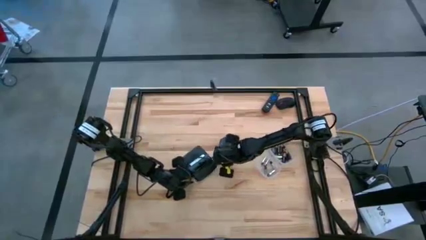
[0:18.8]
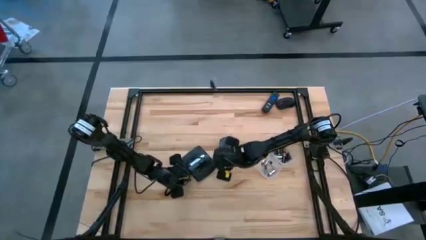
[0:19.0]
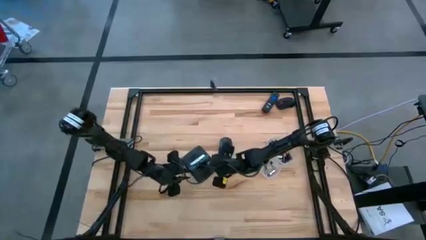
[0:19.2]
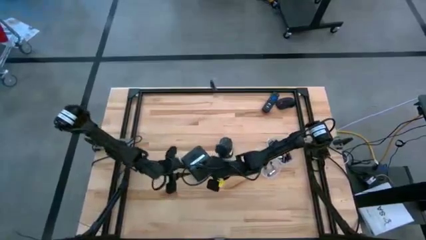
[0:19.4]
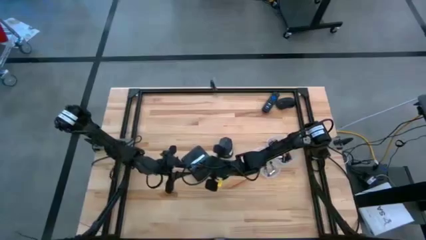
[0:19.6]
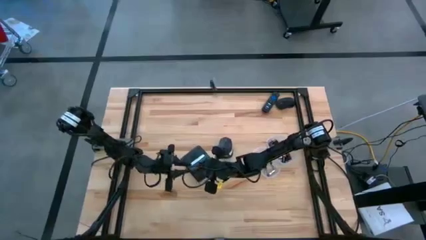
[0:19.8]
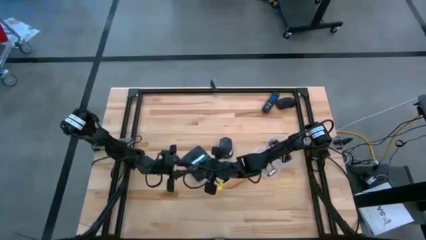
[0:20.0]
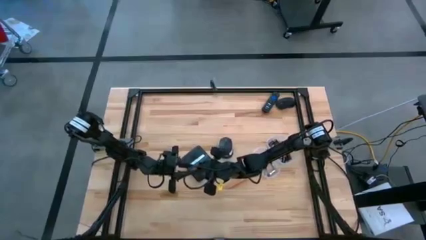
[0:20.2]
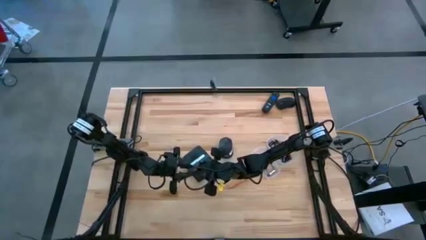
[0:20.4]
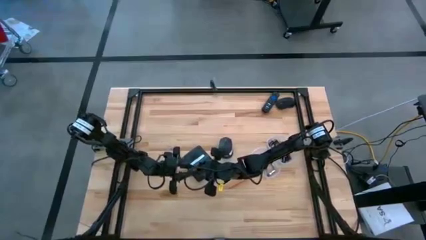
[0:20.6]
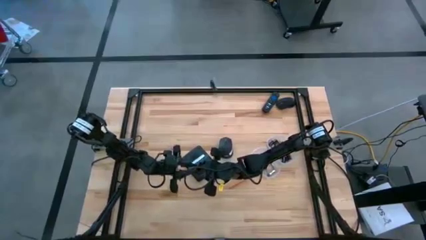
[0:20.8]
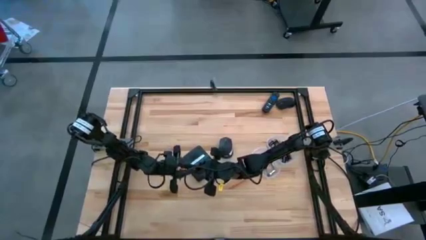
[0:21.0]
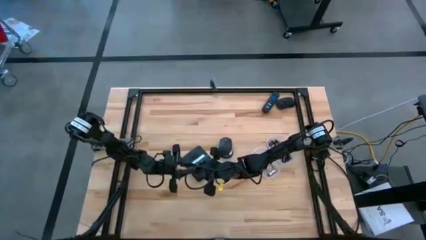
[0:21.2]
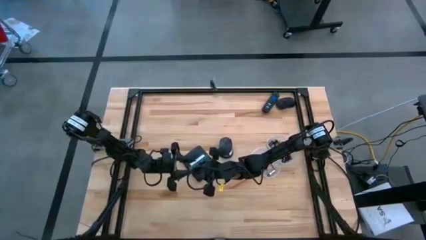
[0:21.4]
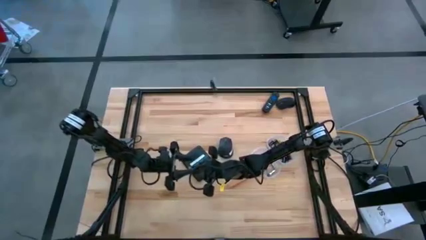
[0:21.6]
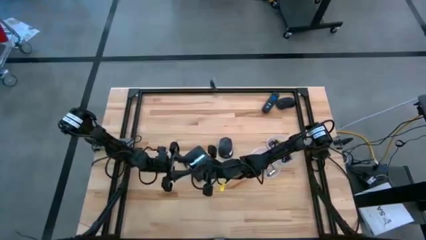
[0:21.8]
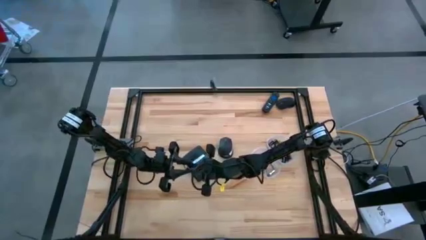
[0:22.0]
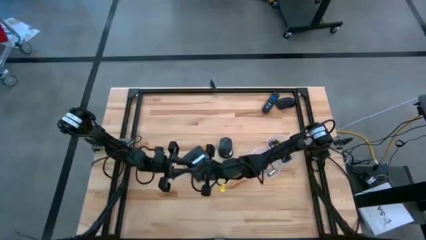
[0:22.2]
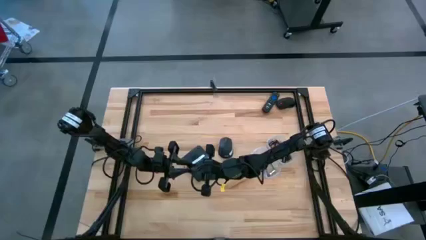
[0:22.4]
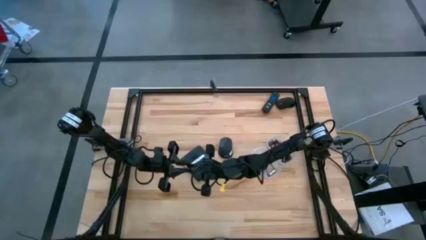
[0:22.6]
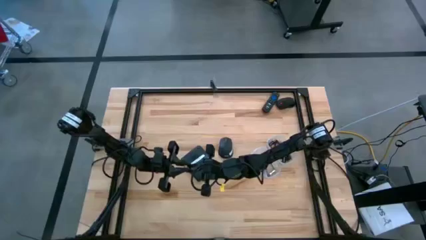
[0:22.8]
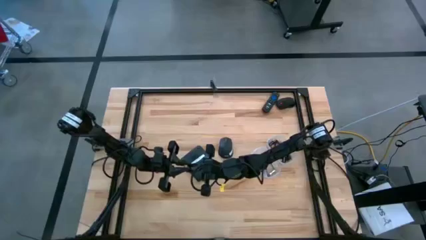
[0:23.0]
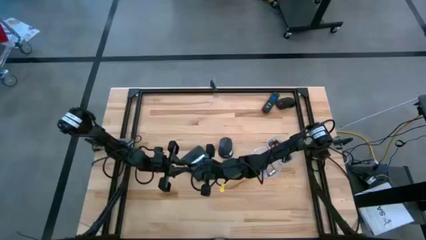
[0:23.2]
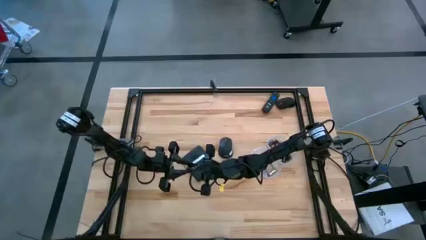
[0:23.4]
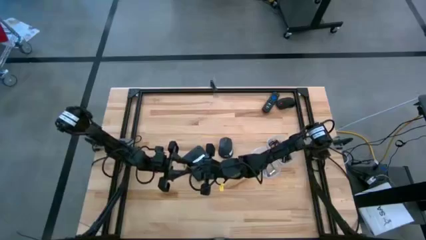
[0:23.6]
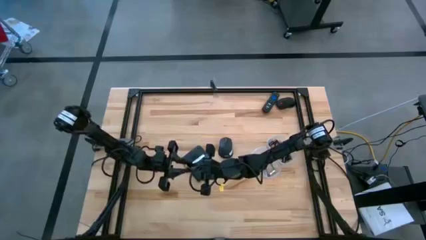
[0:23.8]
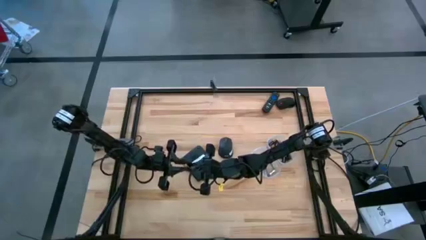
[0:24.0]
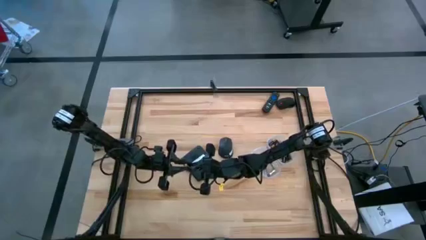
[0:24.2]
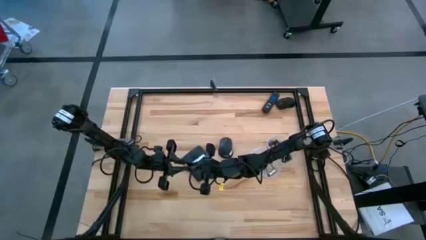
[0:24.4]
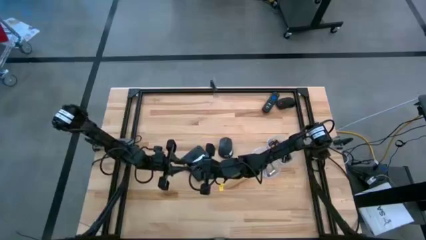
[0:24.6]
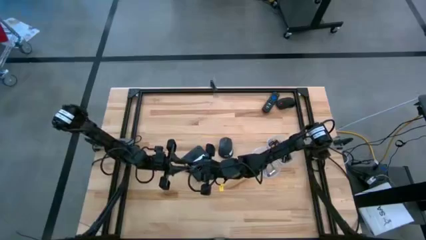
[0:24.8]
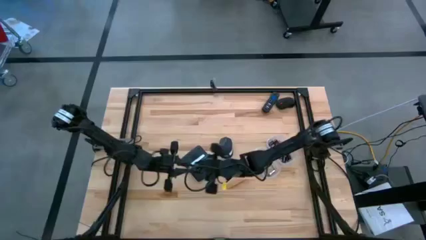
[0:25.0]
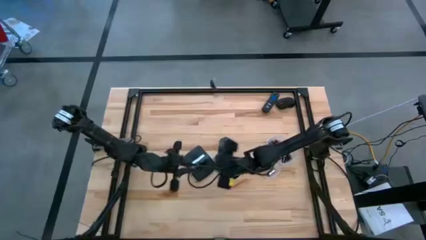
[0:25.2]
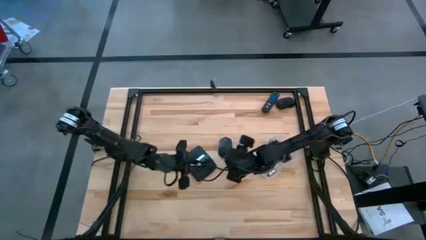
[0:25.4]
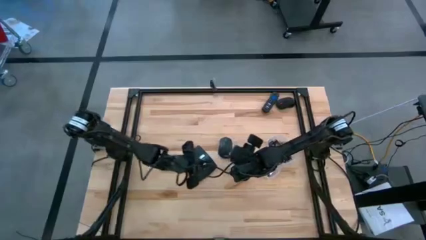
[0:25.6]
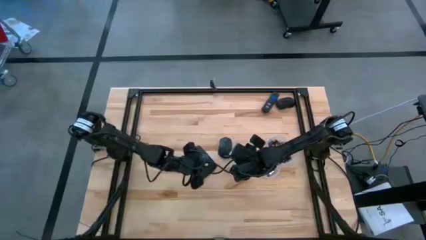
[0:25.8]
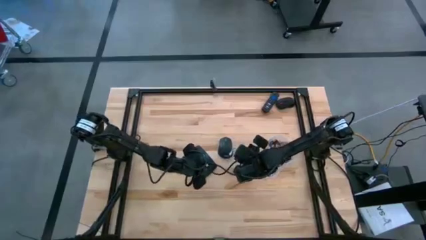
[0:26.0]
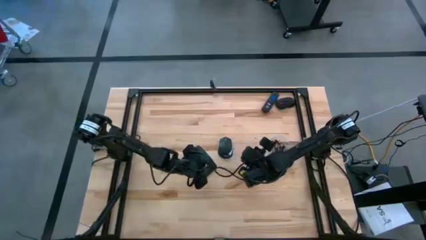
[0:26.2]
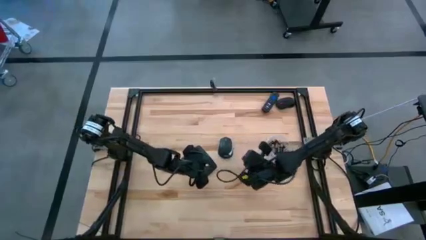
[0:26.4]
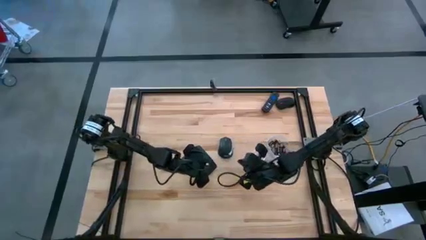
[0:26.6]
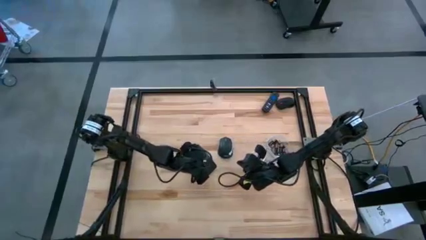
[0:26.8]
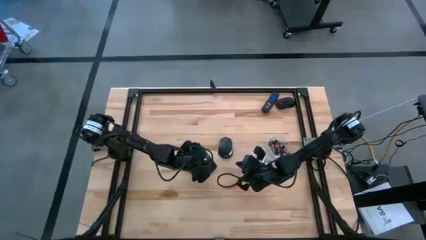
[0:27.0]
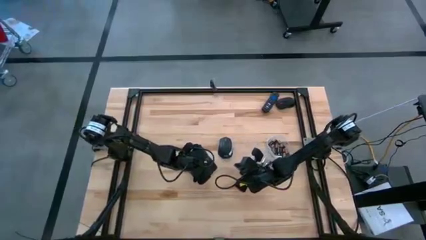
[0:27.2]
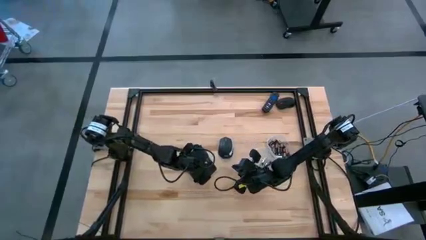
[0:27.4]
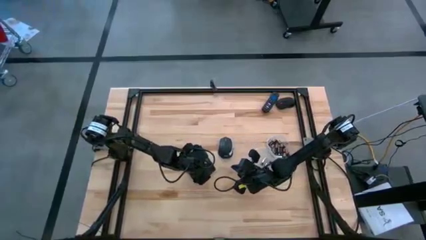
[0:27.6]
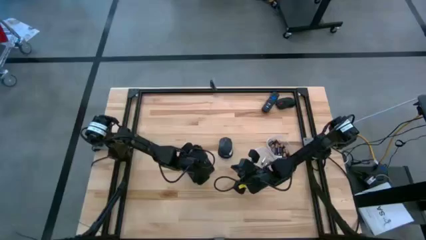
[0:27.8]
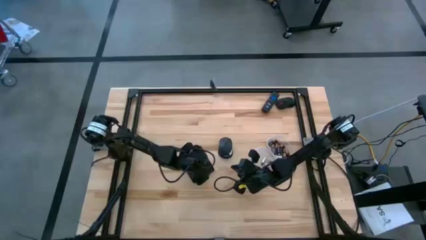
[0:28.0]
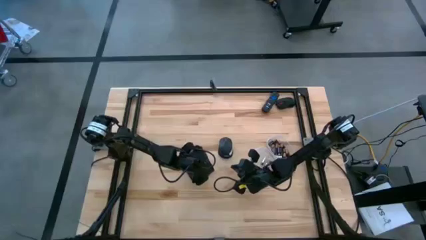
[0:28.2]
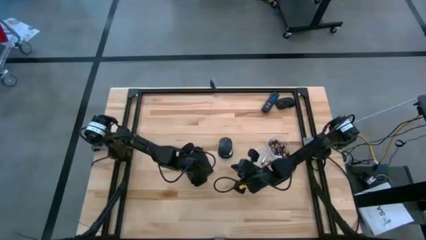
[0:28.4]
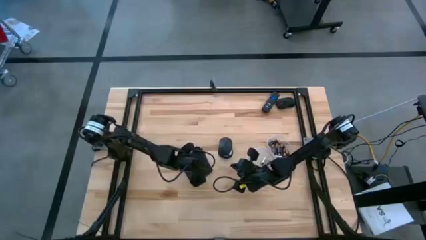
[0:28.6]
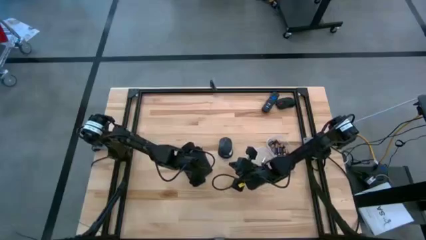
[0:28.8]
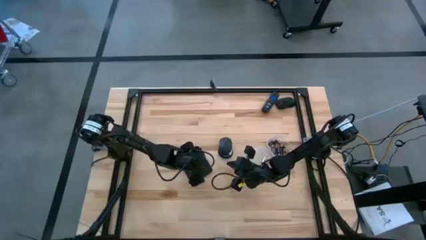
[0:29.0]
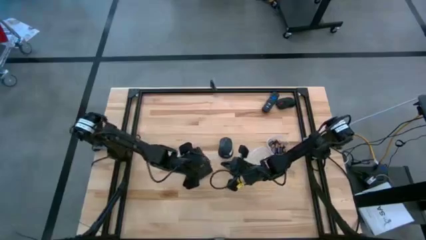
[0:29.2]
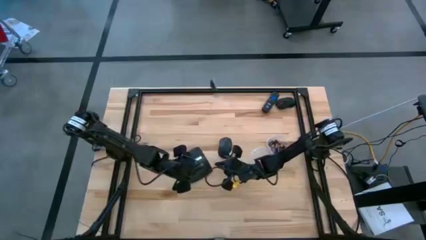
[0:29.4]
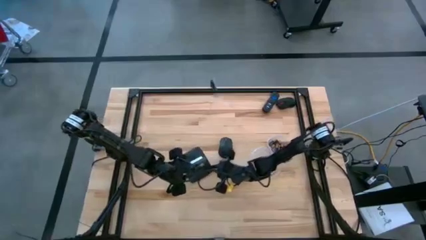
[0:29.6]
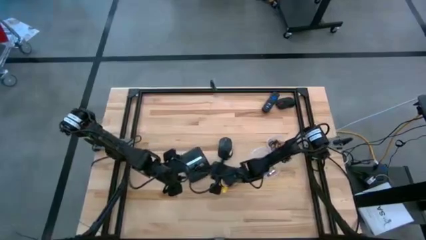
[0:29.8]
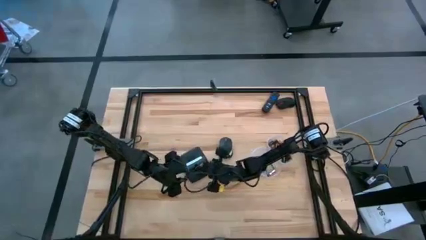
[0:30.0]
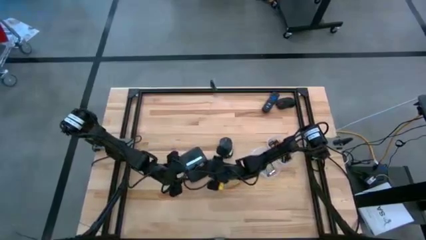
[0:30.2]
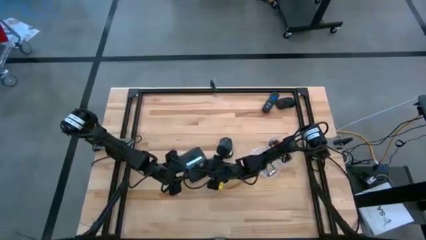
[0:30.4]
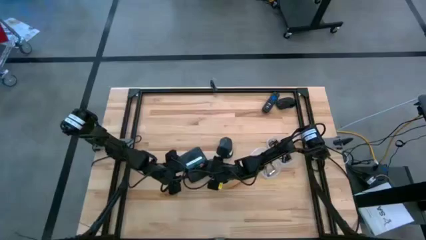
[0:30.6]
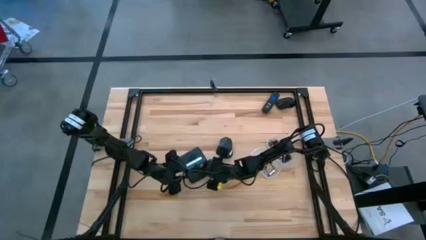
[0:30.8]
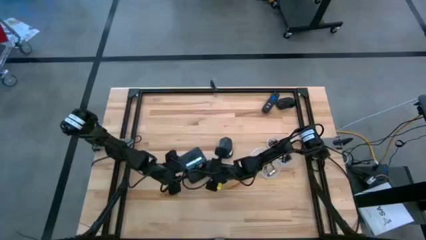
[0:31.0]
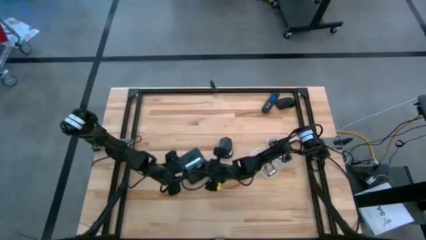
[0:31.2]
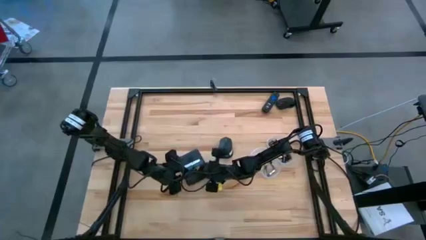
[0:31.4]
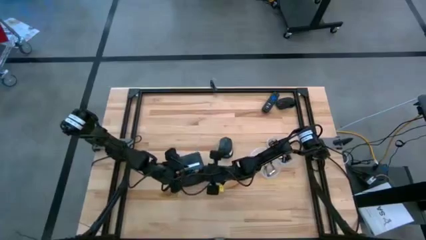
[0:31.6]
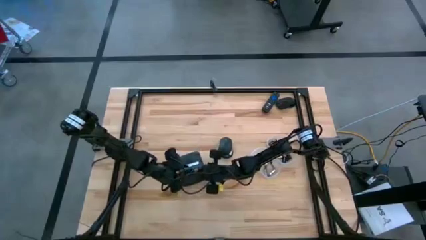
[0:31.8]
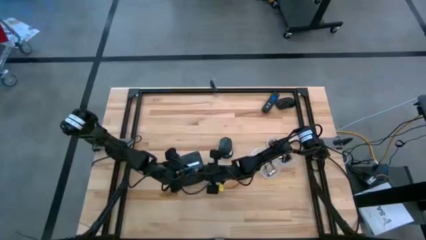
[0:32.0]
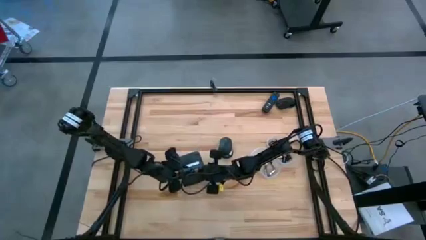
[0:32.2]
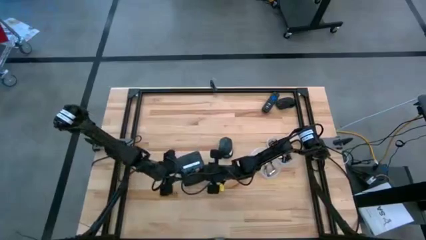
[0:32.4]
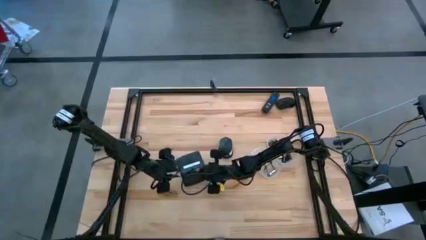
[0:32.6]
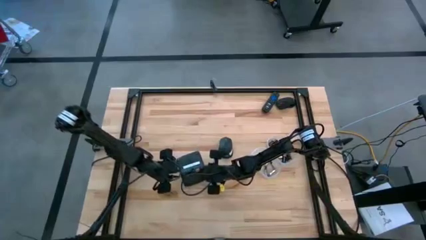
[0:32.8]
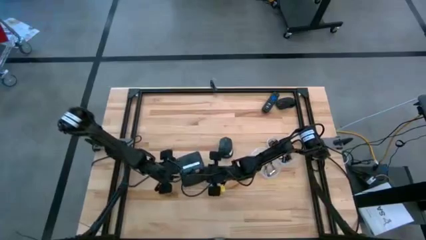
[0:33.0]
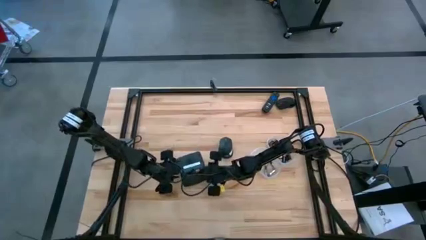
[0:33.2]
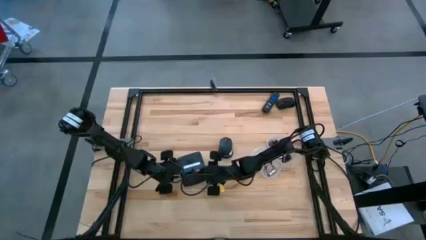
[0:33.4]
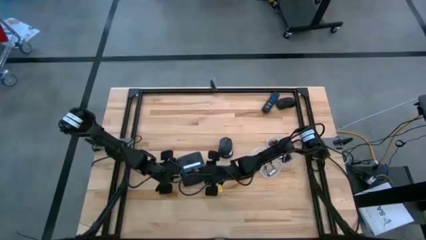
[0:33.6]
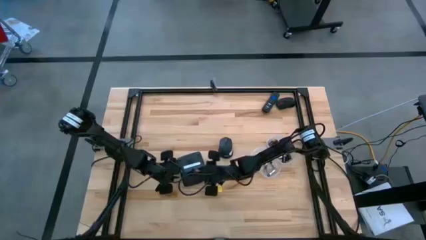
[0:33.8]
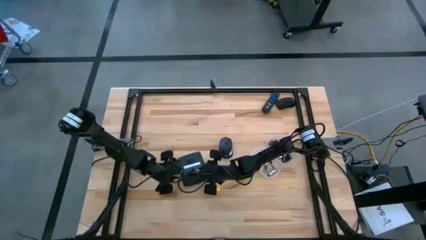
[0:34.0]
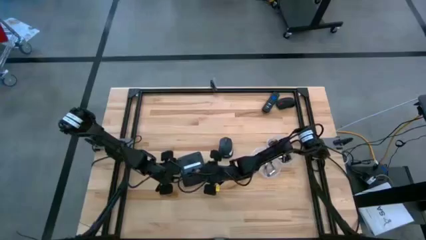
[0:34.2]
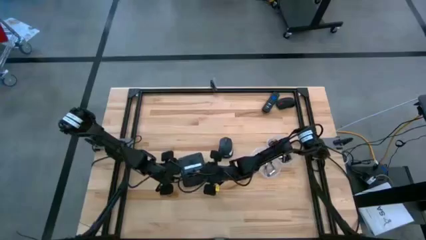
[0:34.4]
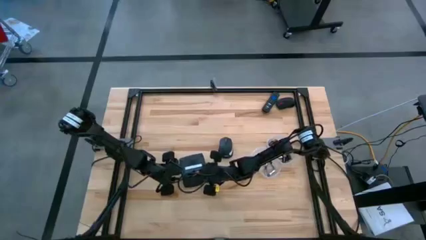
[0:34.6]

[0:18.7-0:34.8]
Task: Insert battery
Insert the brown battery into the calculator battery compartment
